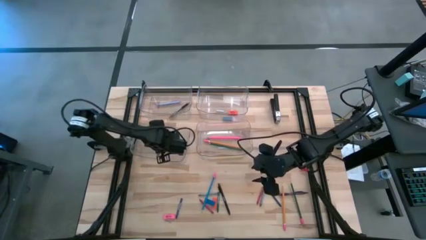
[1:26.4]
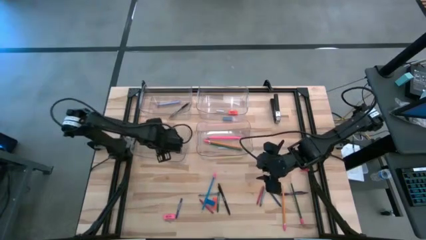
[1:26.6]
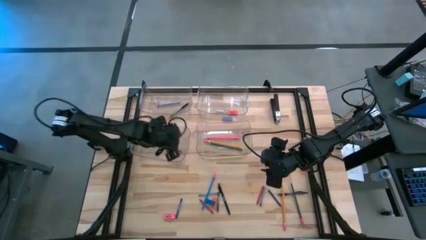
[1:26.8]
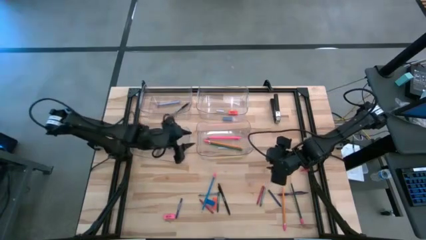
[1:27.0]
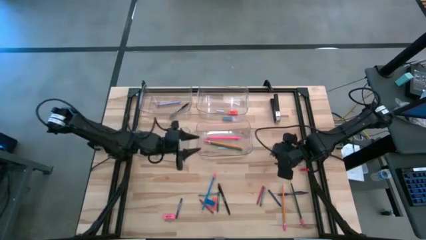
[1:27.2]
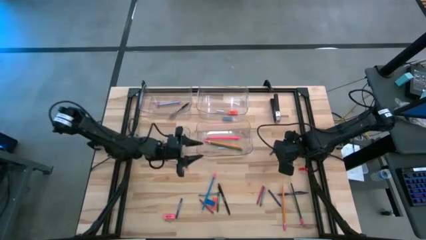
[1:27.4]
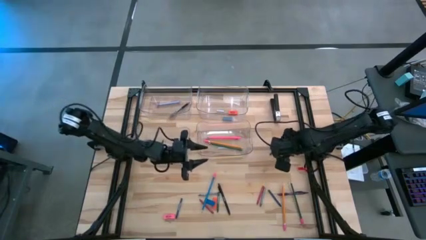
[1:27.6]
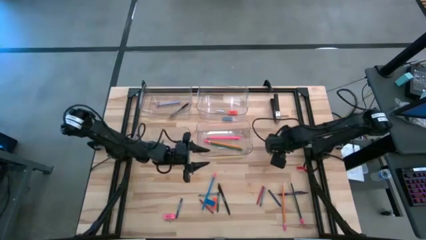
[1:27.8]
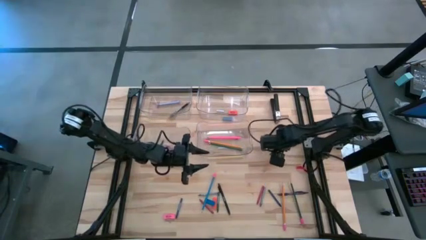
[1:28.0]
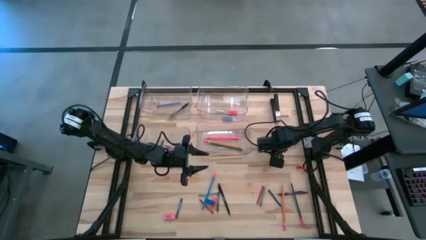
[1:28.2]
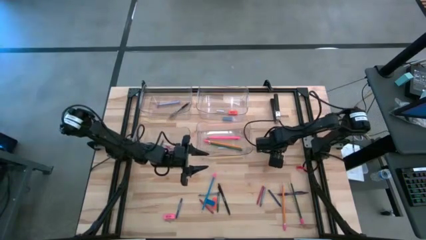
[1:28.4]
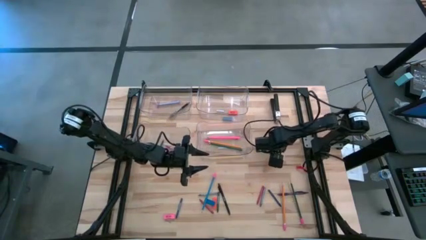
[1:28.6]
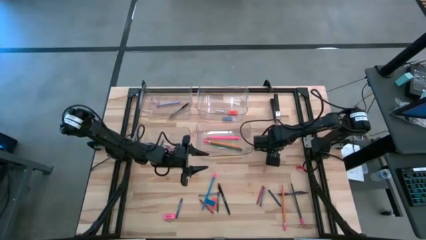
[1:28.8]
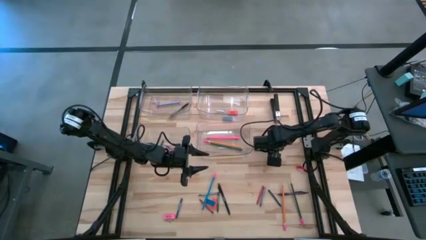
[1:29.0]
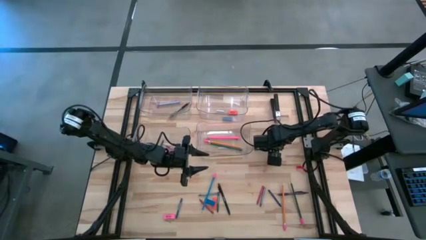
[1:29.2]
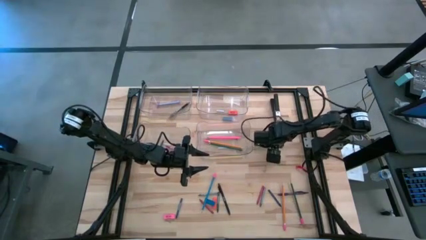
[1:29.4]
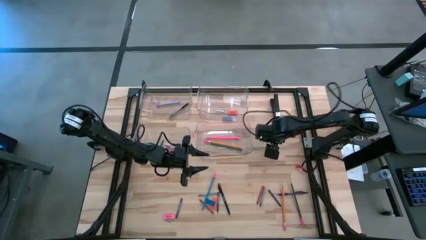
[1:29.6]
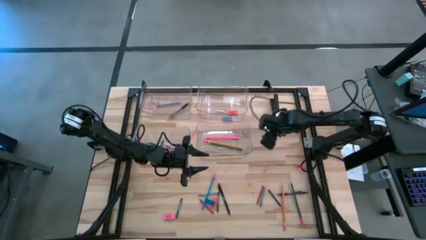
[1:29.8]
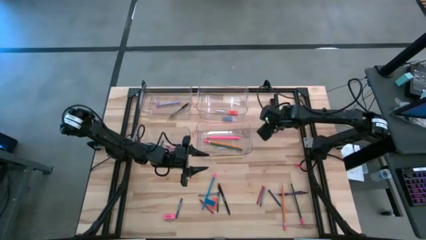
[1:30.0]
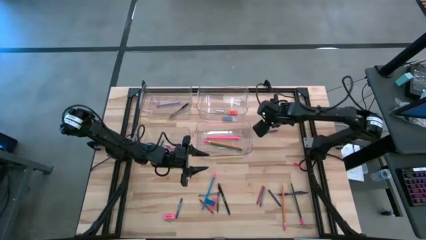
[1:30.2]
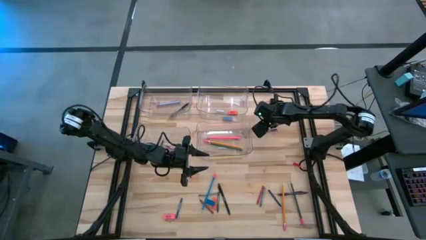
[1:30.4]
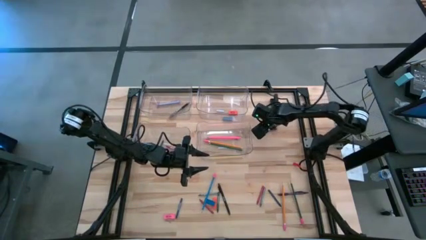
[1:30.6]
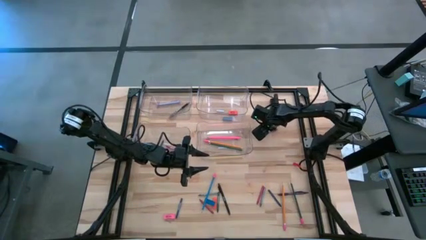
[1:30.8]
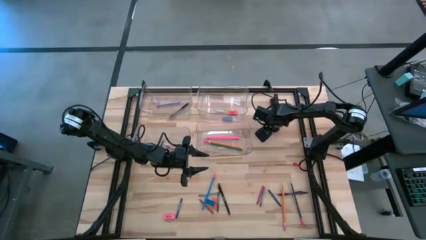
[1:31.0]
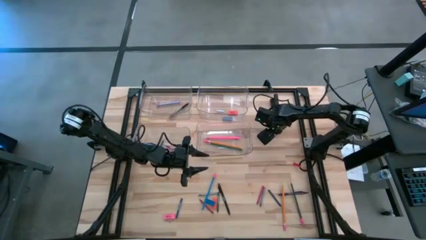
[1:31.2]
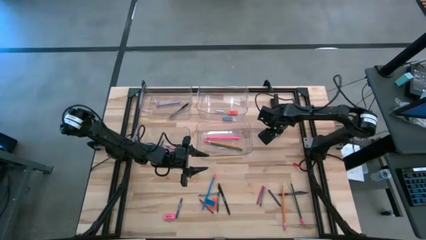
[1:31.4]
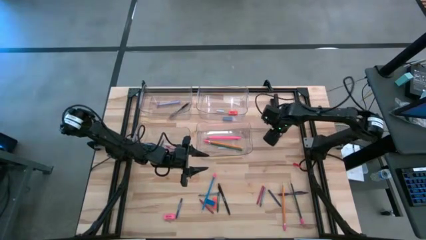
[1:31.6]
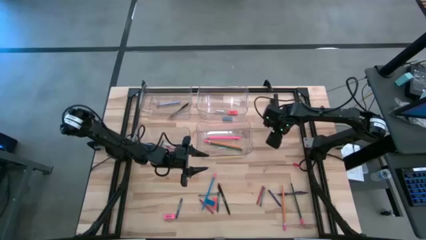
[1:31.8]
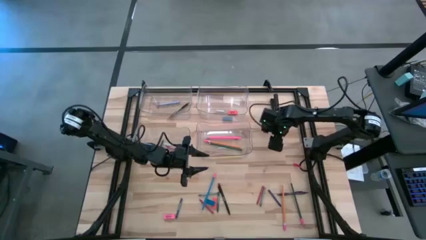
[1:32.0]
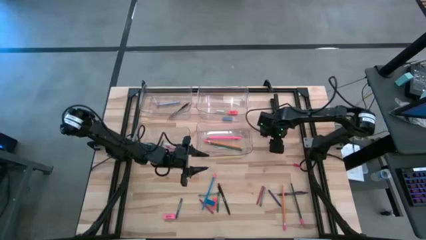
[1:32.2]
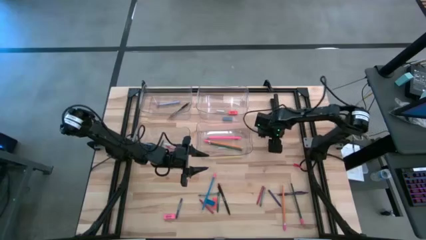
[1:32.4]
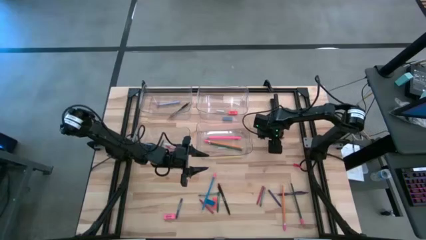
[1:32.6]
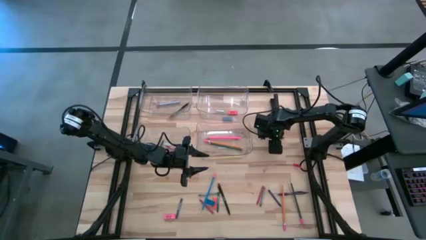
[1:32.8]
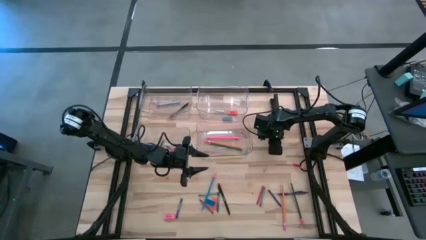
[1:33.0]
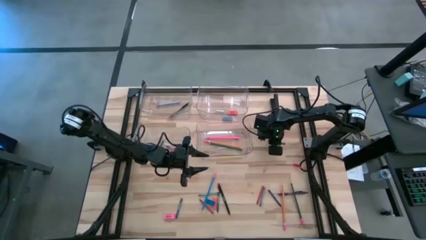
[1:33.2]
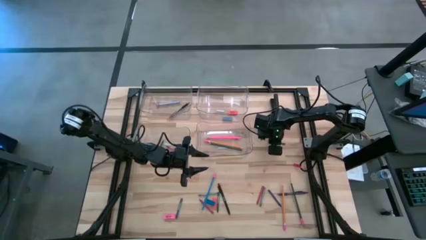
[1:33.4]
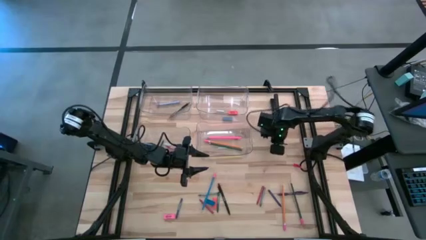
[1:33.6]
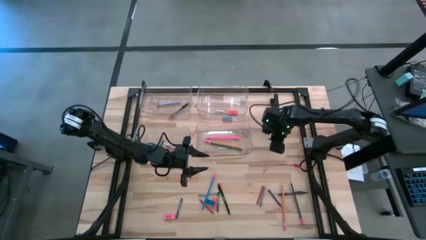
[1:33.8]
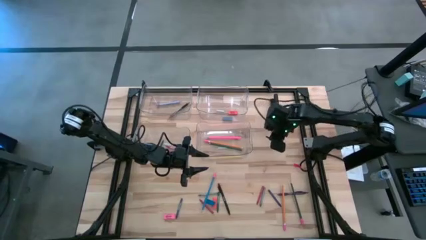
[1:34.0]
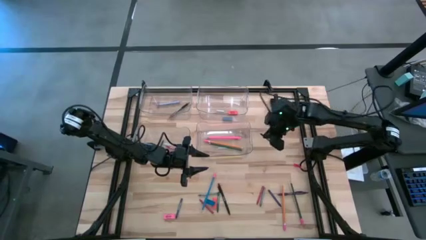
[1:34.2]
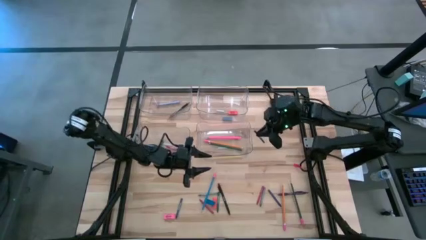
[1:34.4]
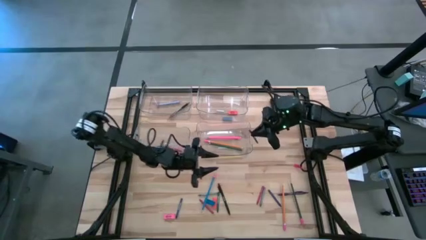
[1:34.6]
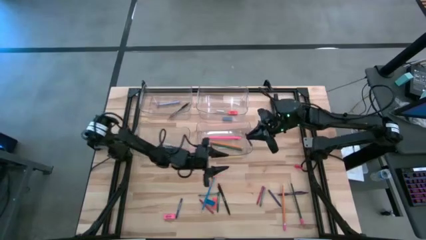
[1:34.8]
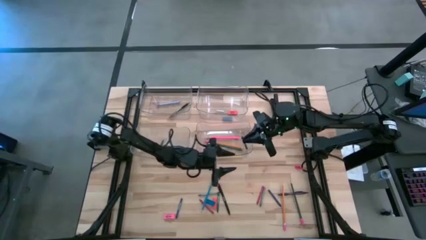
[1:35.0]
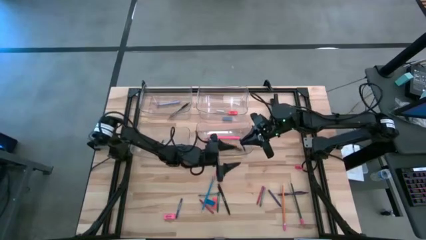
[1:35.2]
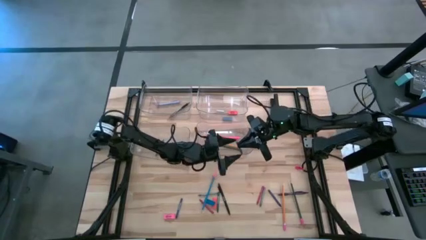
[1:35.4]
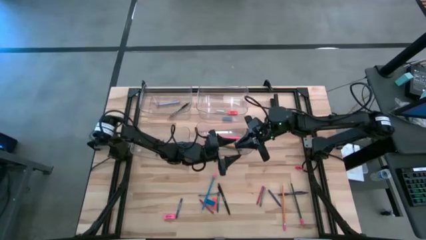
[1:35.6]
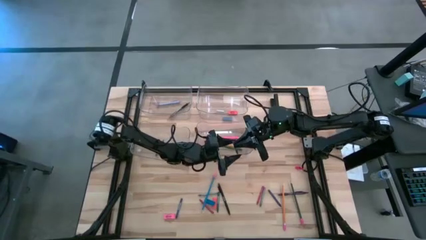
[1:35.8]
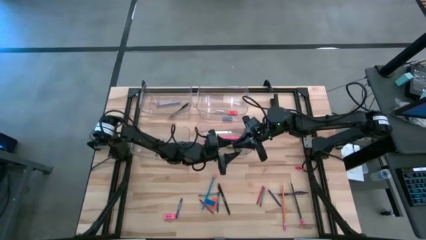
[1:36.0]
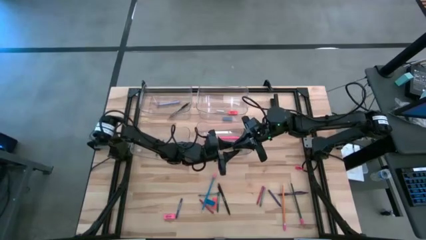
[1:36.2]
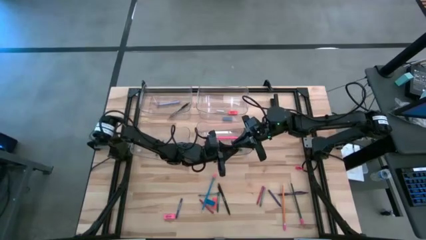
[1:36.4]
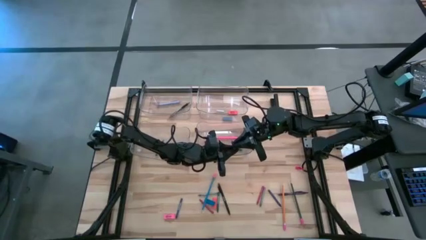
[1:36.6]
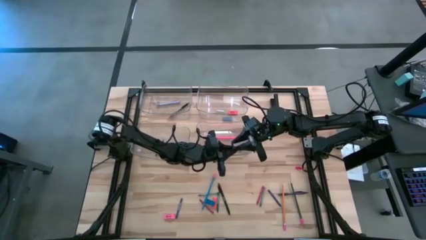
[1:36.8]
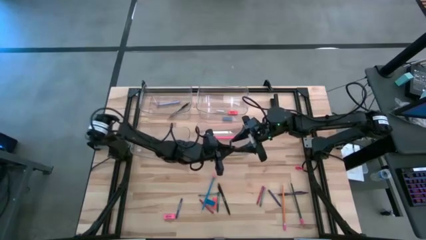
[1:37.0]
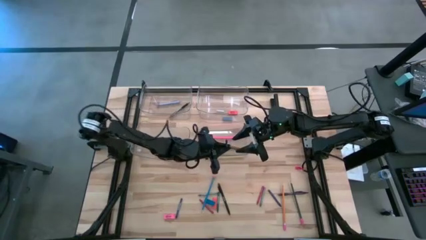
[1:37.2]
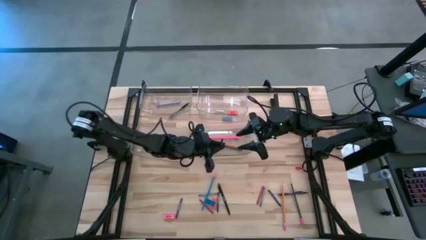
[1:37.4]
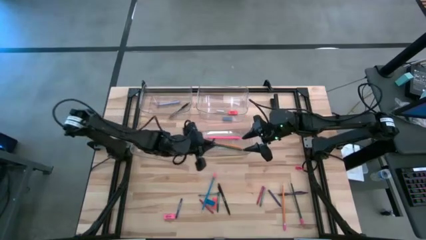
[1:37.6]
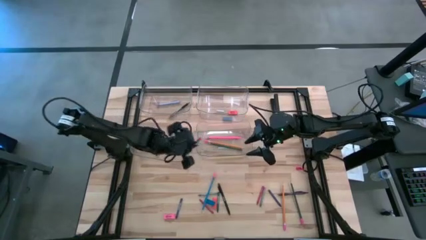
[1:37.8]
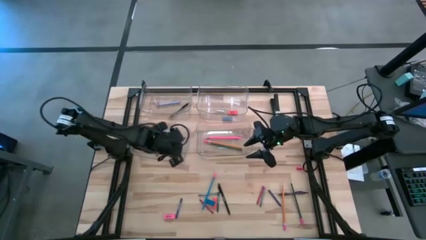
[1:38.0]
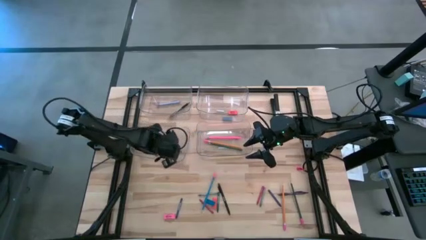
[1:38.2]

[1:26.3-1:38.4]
Task: Sort crayons/erasers/pens/pencils in bins
Put the top right blue crayon into the bottom left transparent bin

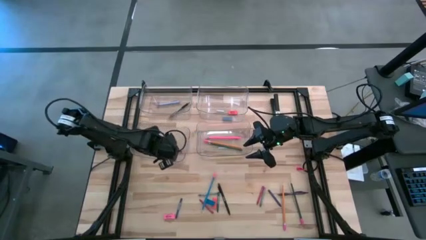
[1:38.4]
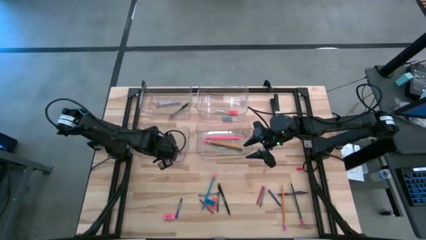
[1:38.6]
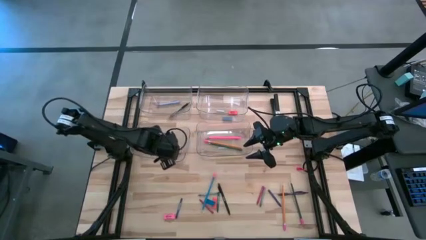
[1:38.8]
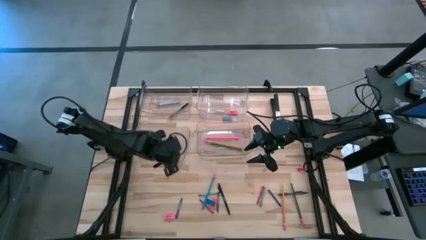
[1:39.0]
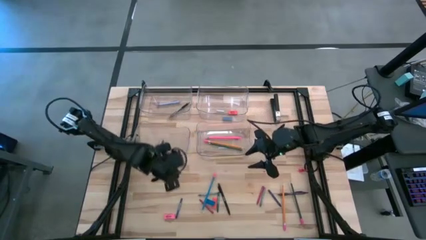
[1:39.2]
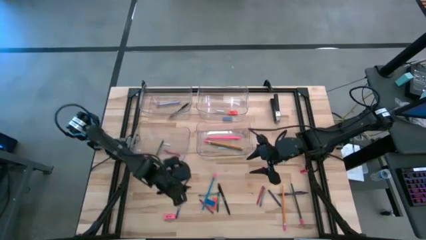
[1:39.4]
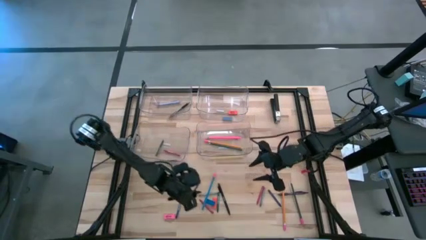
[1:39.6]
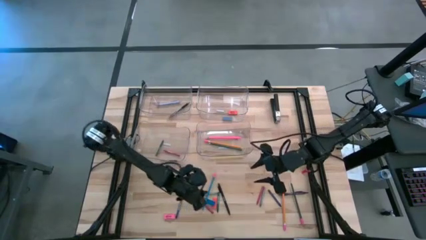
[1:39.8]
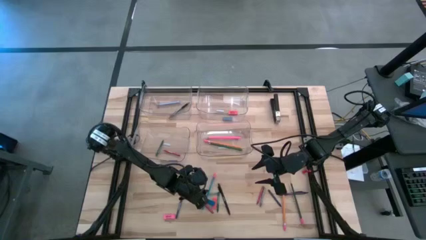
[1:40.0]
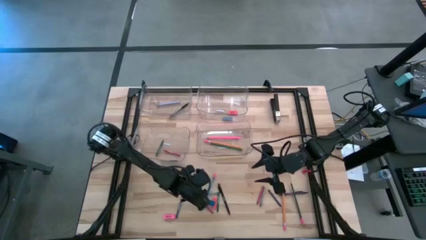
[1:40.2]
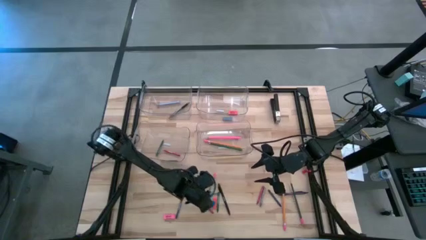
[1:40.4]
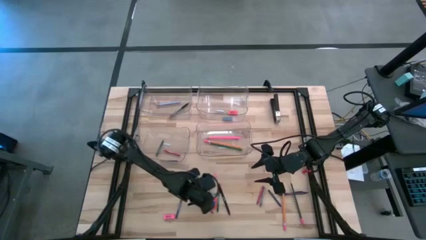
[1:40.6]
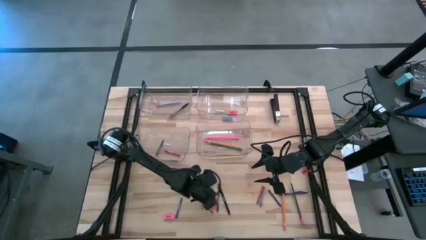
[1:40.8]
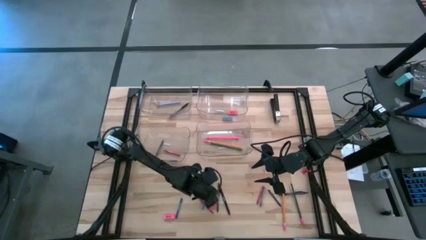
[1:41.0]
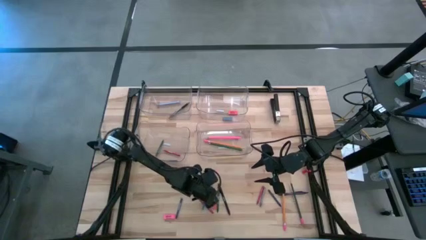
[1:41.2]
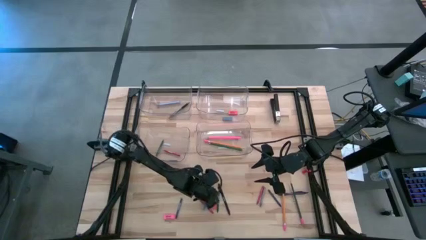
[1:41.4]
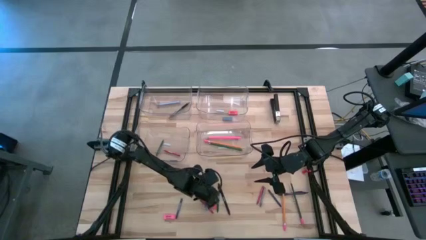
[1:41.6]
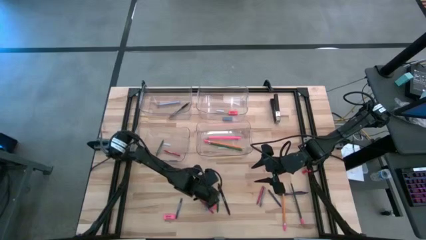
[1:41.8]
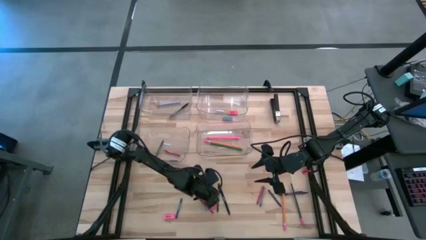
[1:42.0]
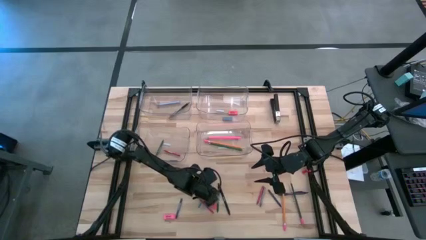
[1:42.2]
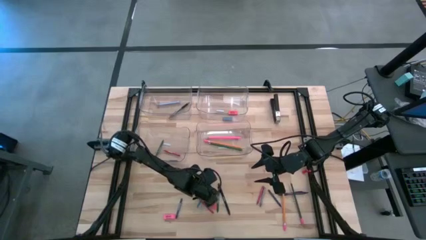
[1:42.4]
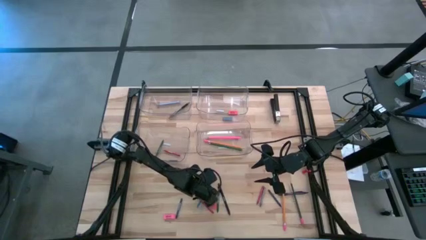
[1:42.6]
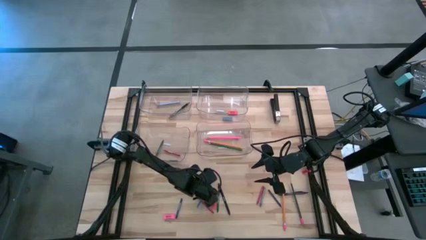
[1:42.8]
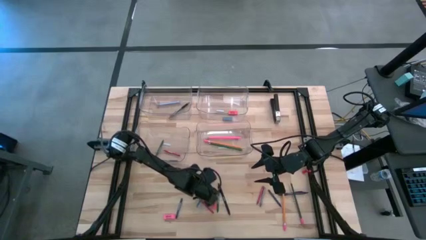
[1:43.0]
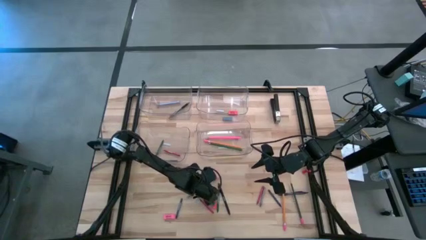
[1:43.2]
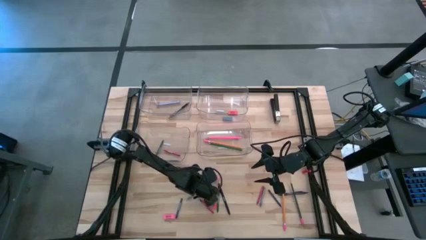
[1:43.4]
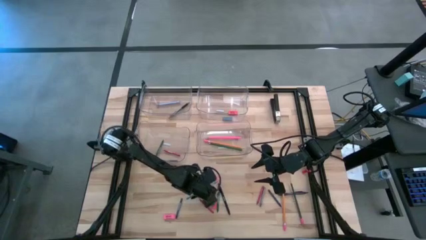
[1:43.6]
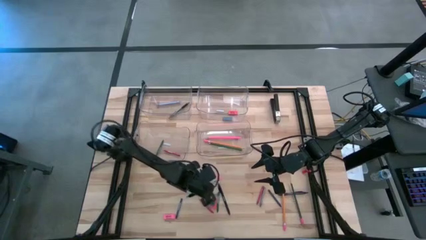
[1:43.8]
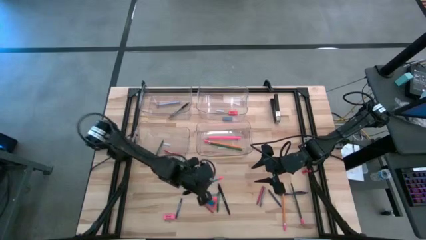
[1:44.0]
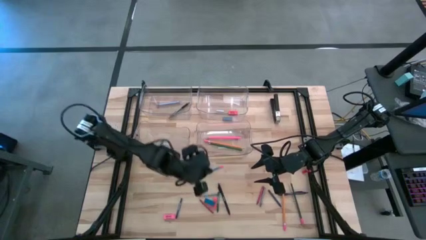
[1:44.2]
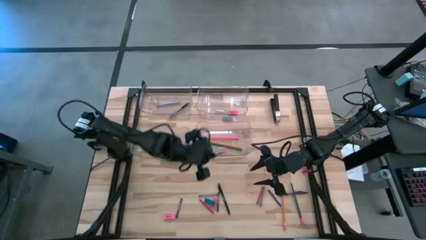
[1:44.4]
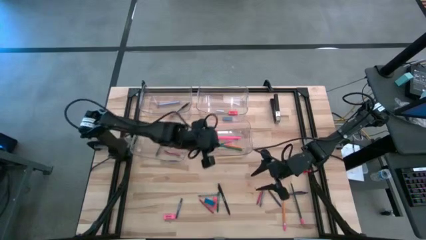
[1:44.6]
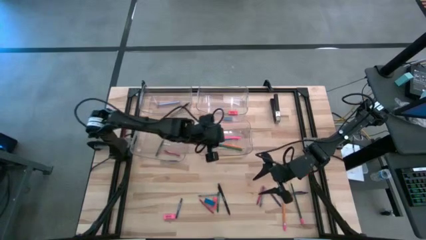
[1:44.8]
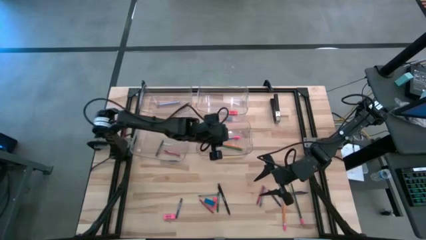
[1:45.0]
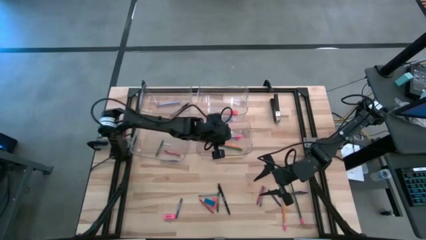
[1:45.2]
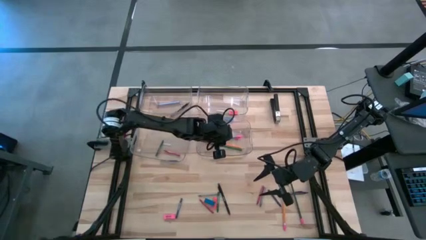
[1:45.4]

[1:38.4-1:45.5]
Put the blue pencil into the bottom right transparent bin
